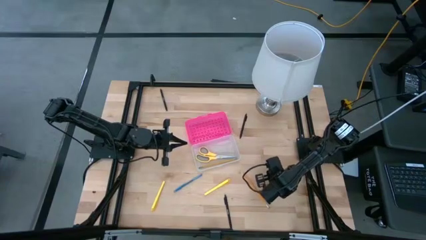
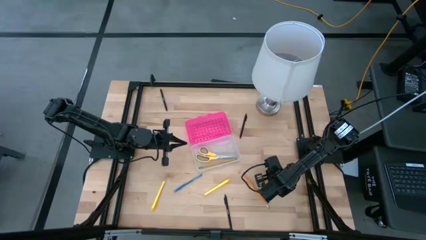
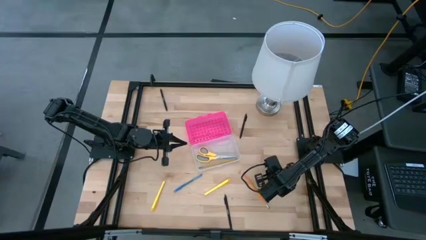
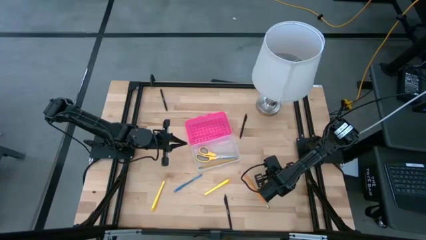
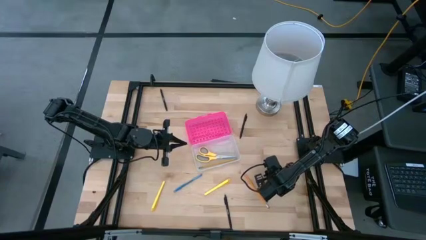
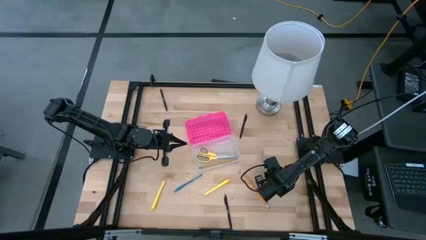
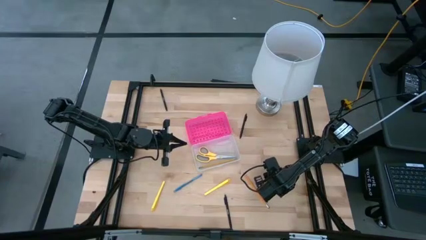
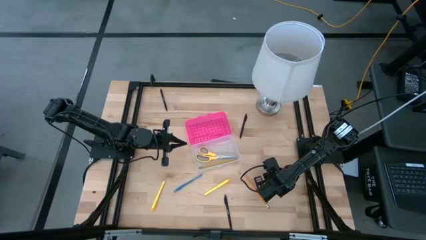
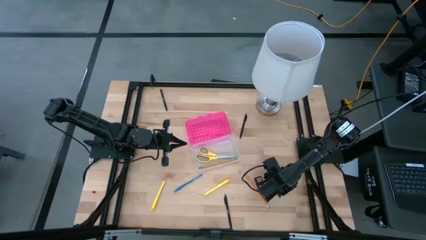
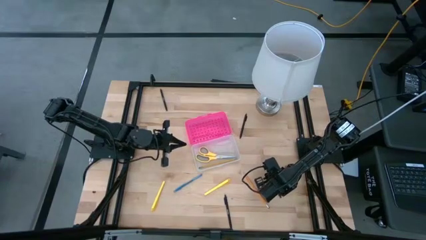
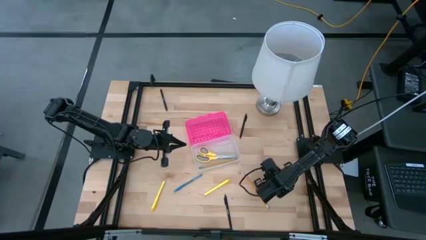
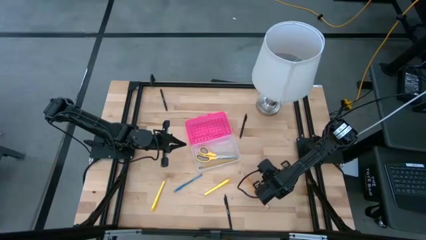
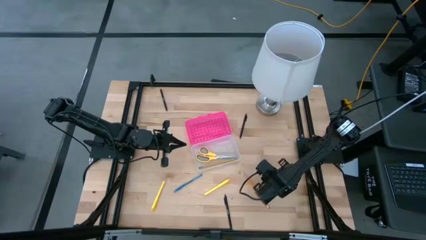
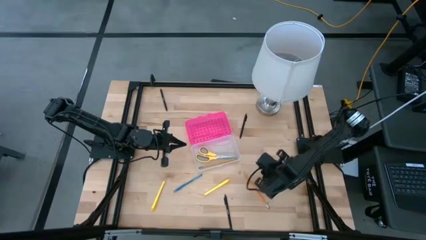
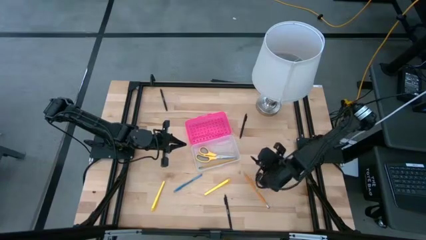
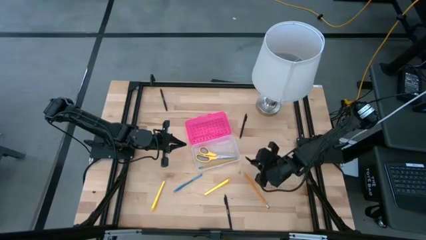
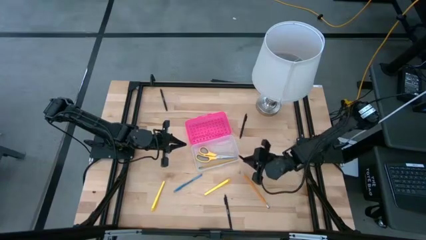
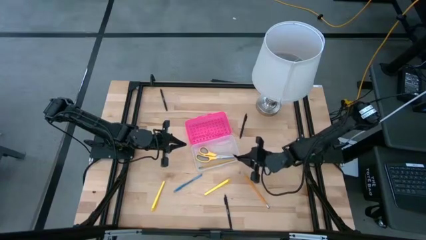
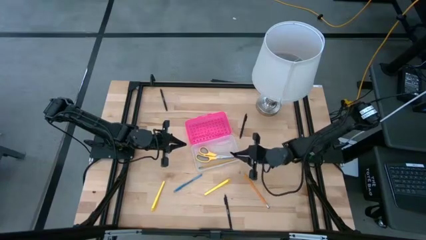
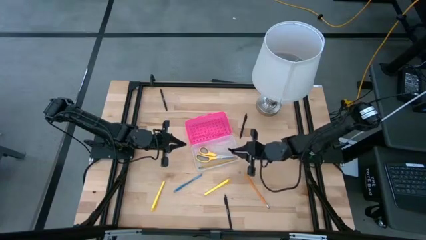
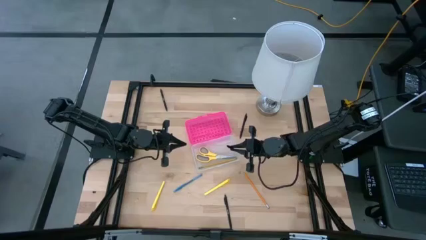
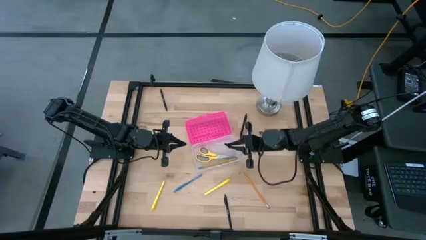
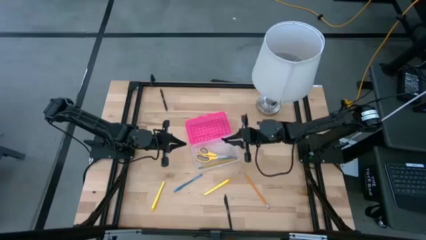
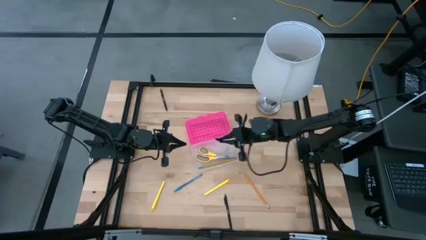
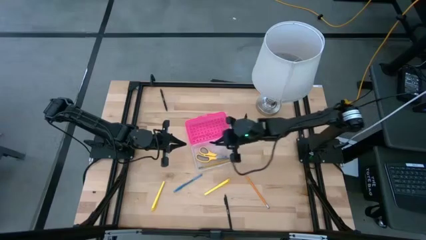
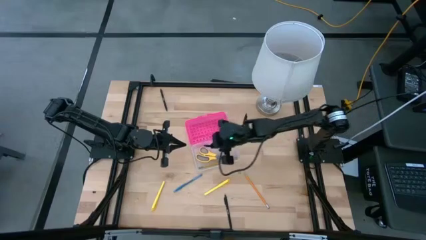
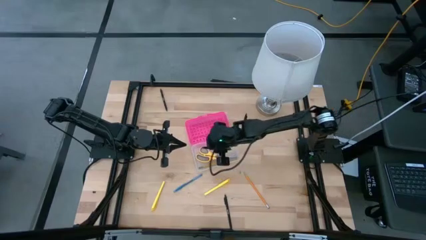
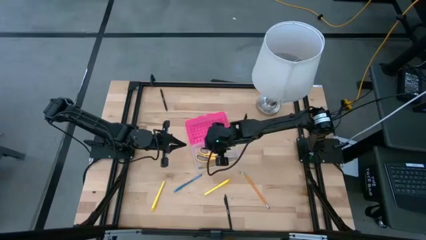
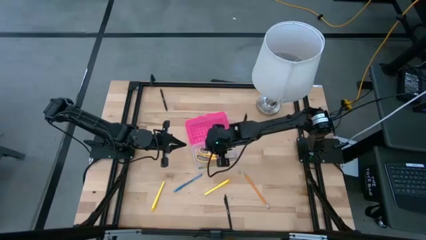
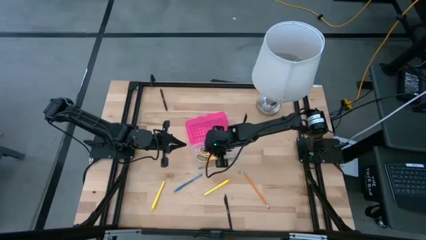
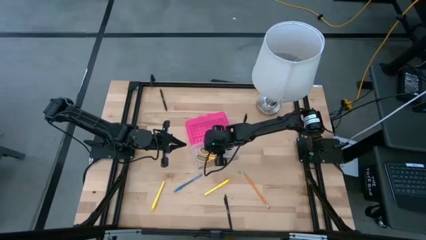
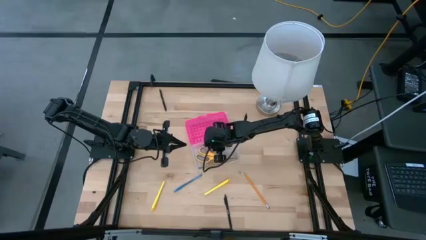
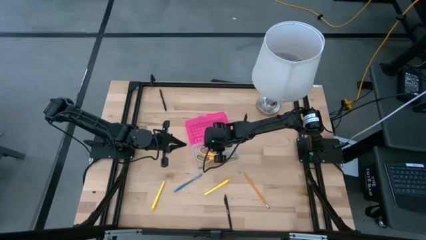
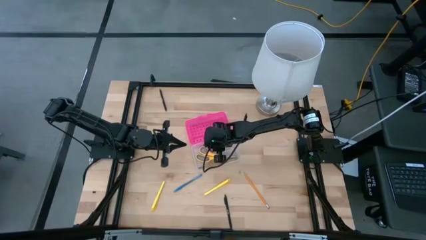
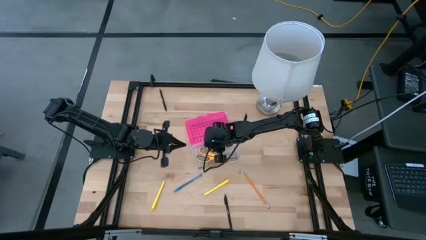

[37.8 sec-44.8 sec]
Task: Pick & place school supplies into a supply box
Put the black pen into the pink supply box

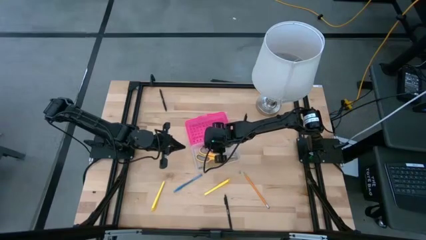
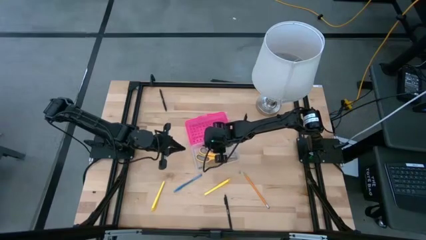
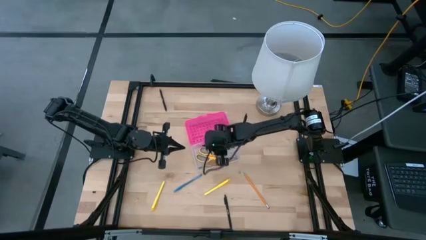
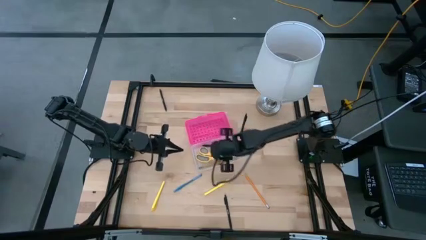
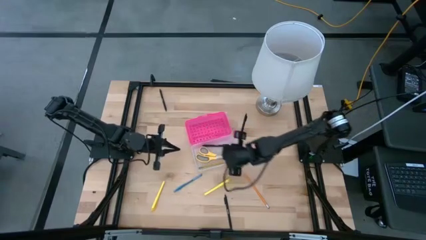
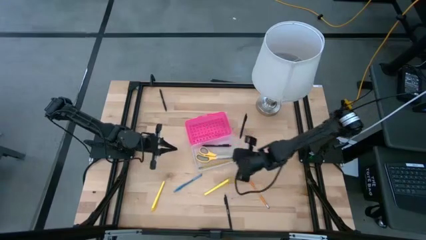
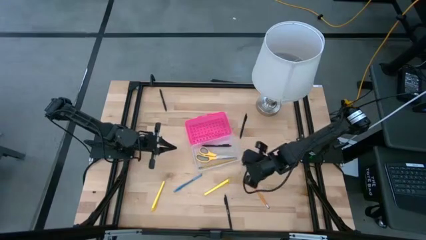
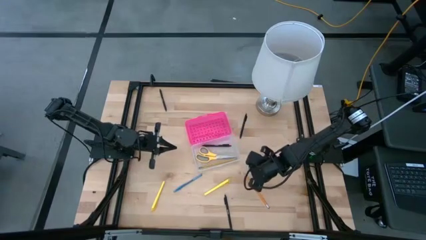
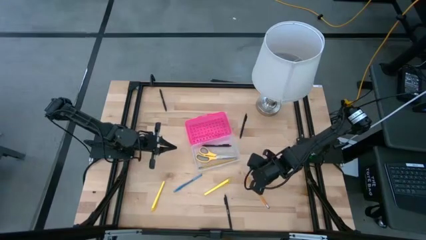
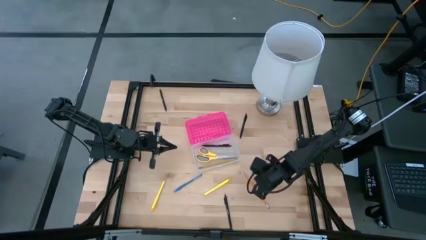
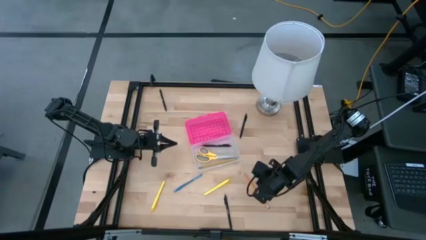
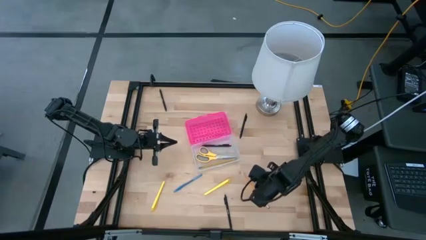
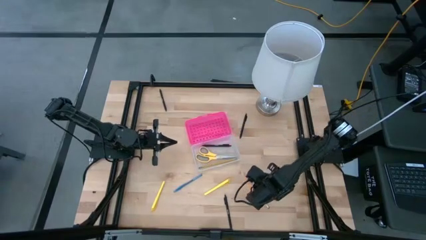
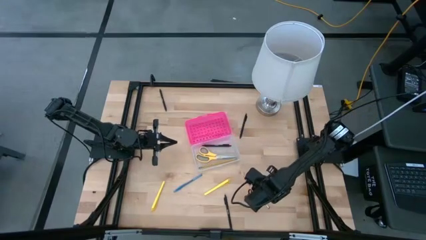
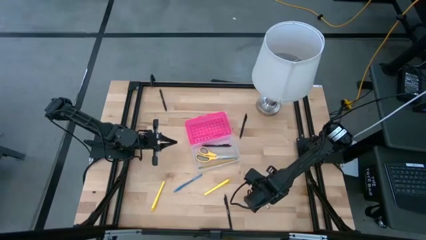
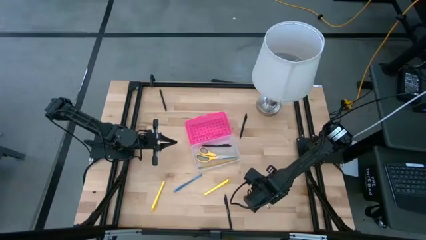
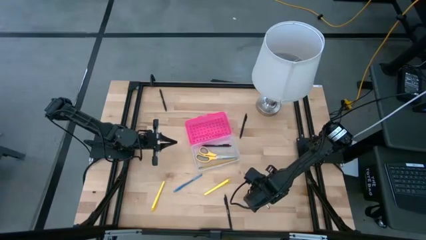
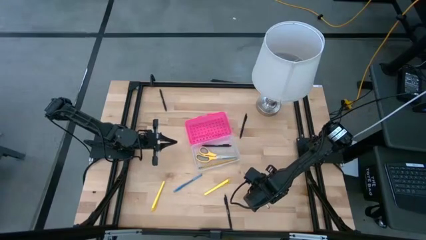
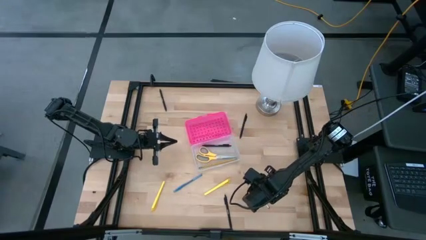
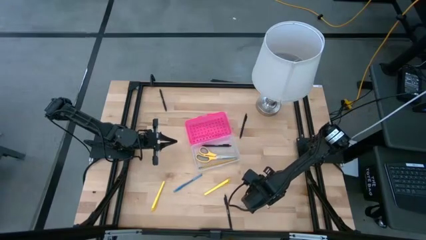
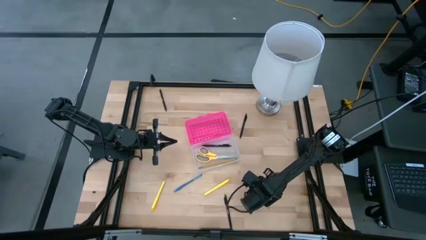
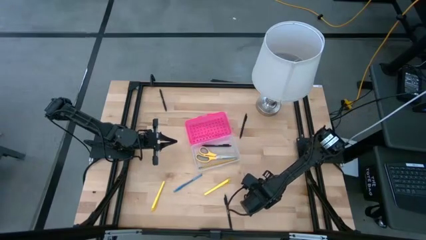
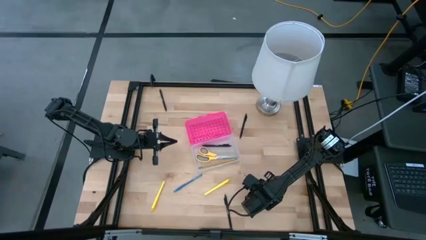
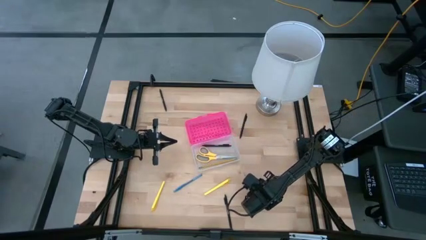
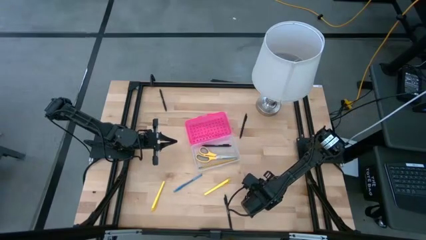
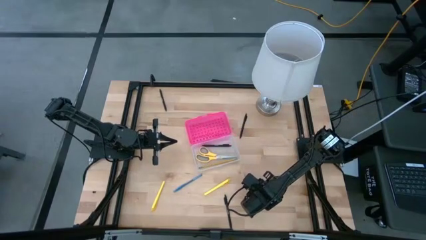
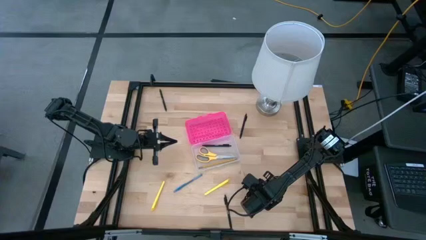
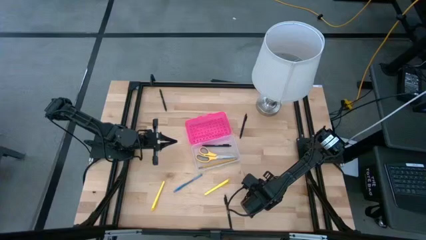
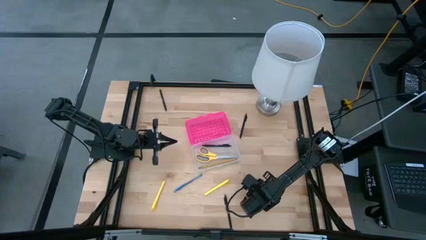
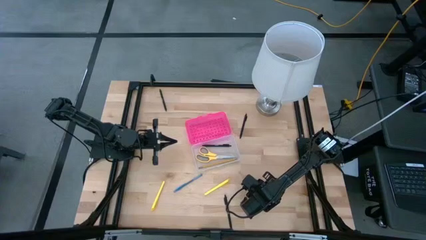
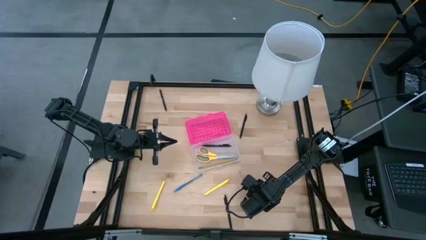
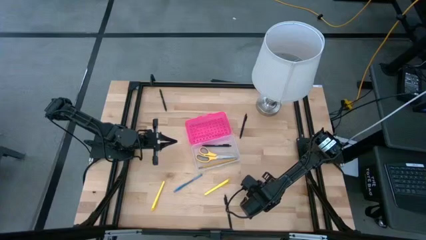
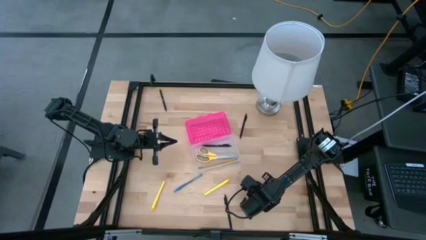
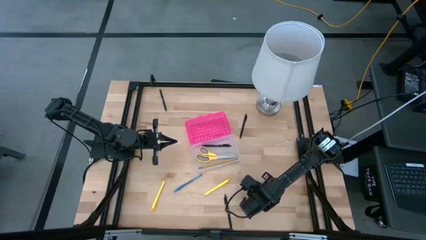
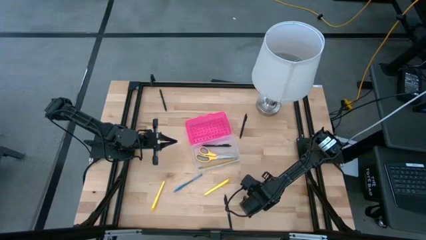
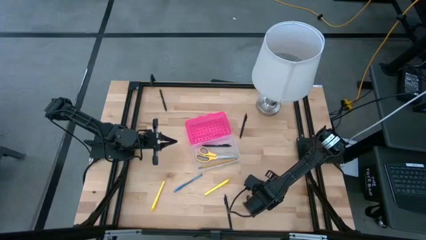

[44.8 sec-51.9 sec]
Put the orange pencil into the pink supply box
